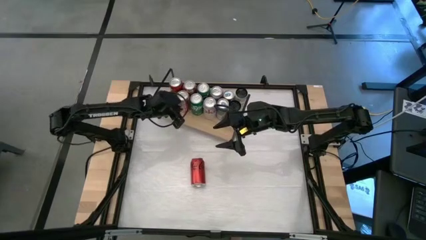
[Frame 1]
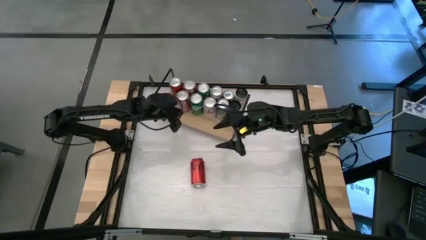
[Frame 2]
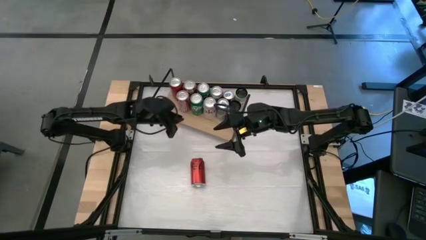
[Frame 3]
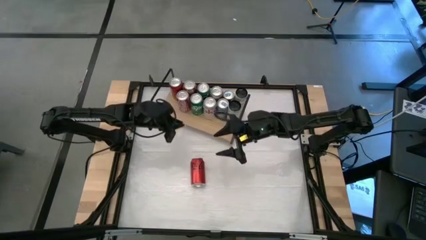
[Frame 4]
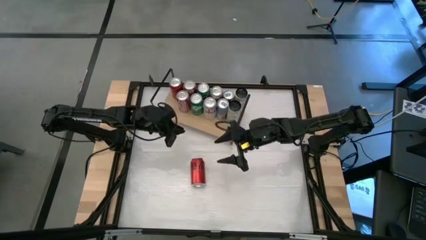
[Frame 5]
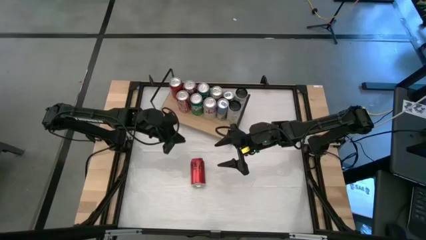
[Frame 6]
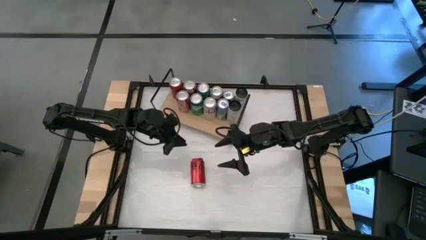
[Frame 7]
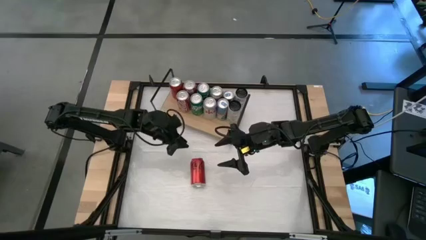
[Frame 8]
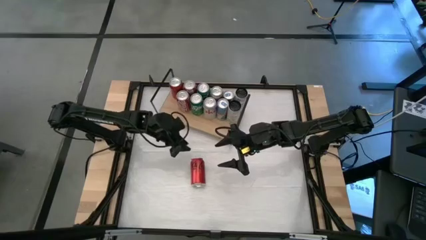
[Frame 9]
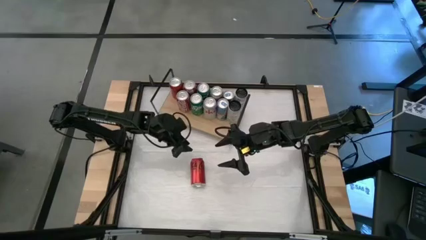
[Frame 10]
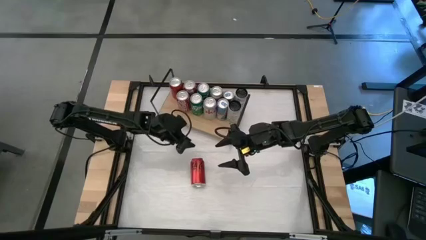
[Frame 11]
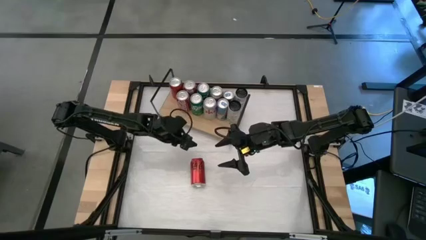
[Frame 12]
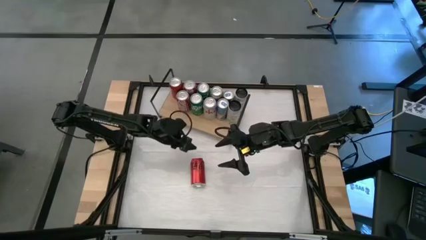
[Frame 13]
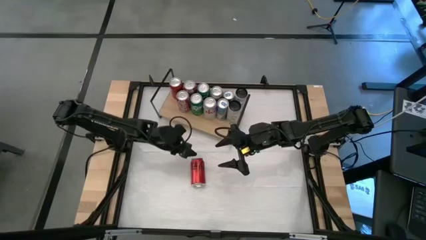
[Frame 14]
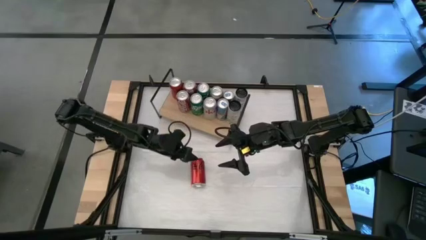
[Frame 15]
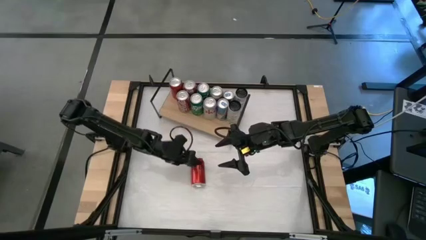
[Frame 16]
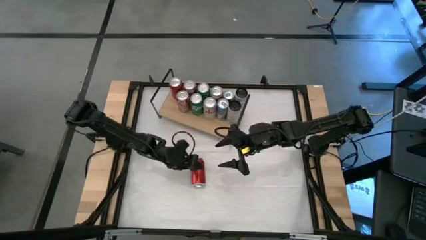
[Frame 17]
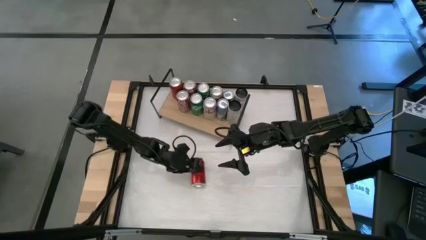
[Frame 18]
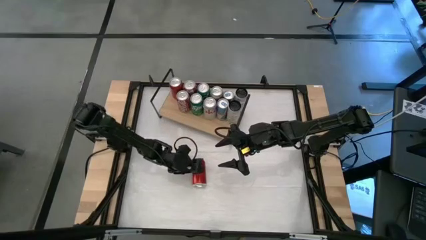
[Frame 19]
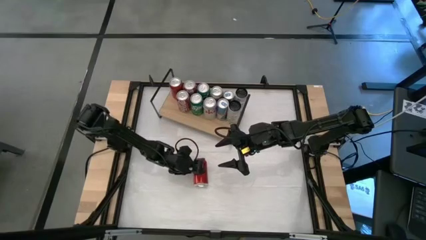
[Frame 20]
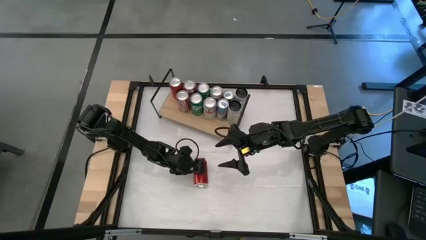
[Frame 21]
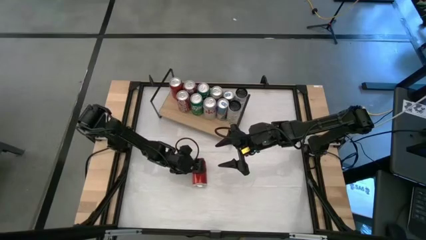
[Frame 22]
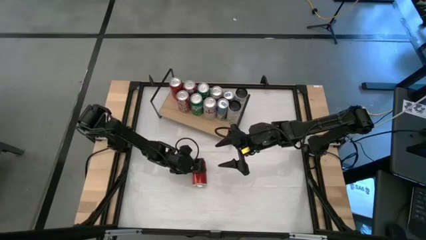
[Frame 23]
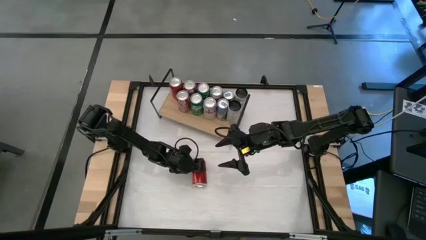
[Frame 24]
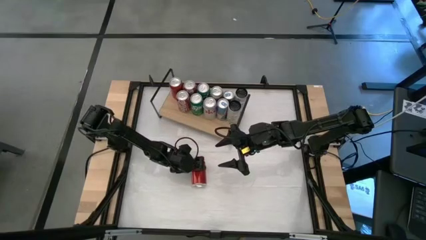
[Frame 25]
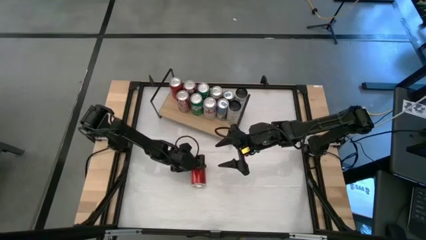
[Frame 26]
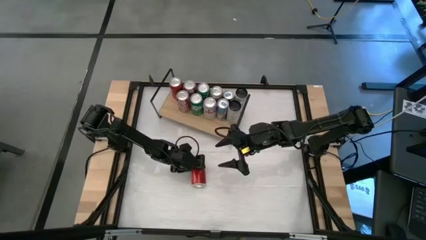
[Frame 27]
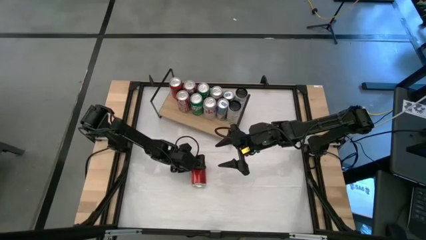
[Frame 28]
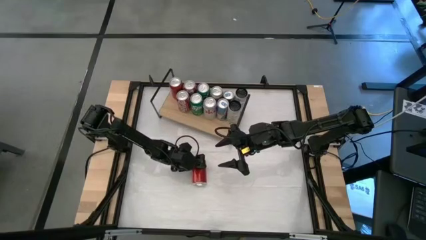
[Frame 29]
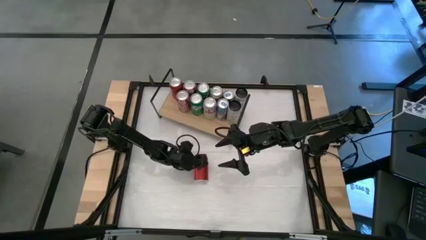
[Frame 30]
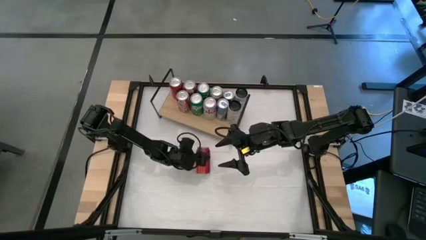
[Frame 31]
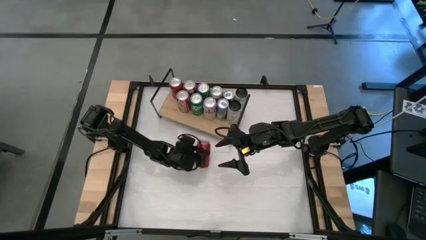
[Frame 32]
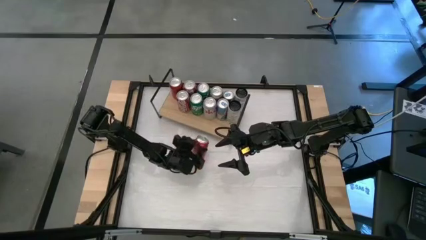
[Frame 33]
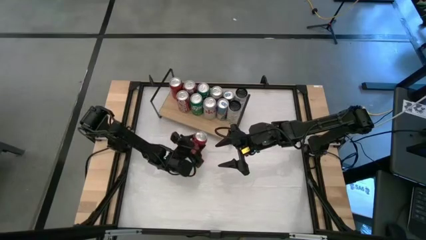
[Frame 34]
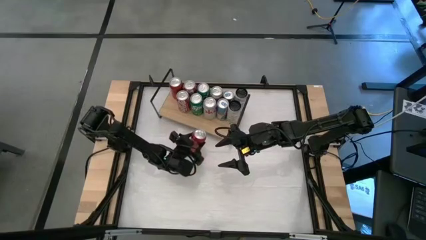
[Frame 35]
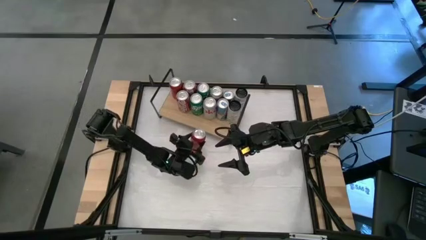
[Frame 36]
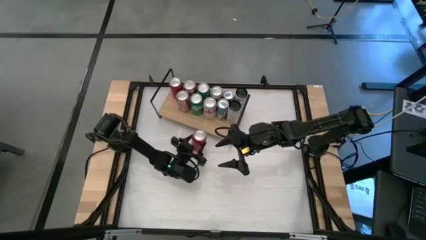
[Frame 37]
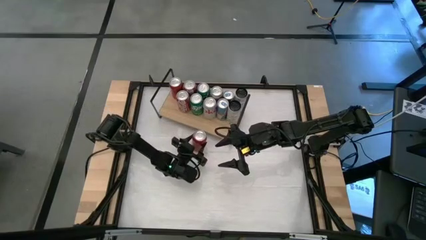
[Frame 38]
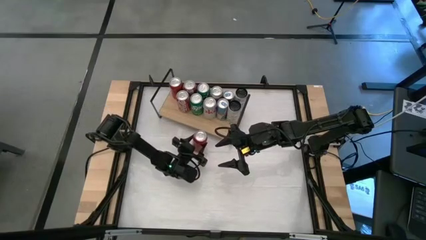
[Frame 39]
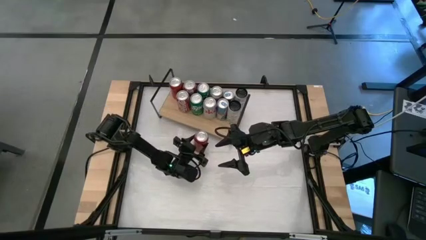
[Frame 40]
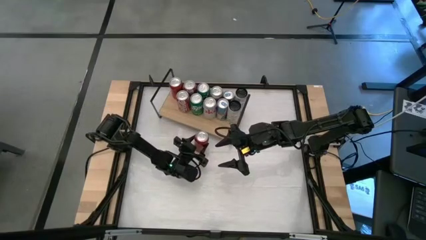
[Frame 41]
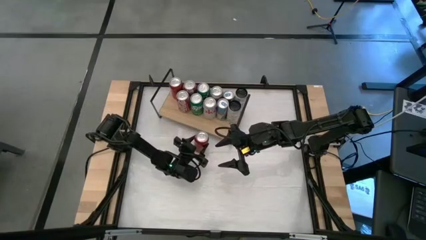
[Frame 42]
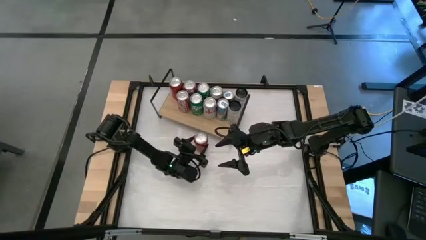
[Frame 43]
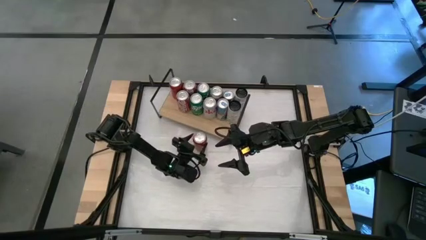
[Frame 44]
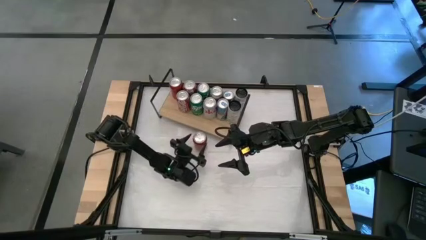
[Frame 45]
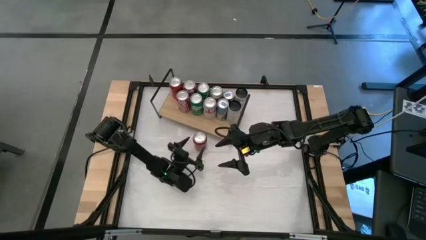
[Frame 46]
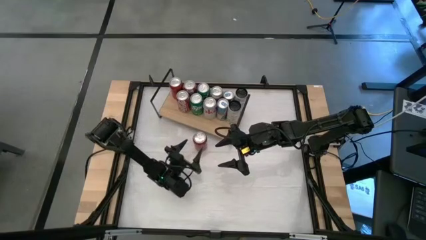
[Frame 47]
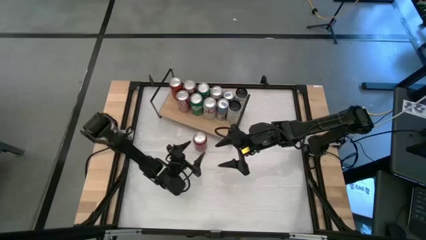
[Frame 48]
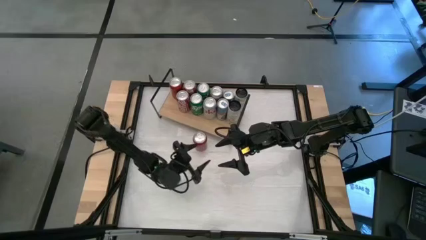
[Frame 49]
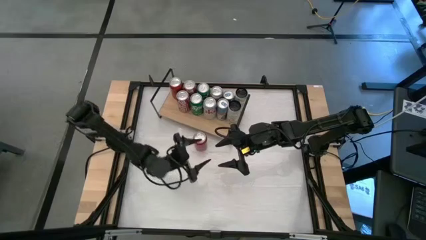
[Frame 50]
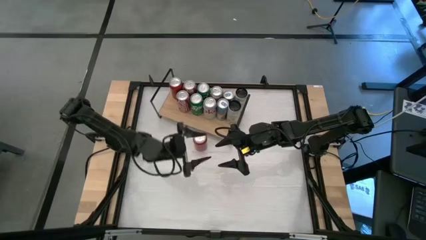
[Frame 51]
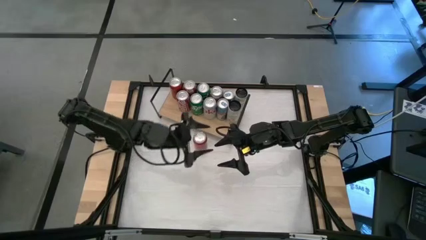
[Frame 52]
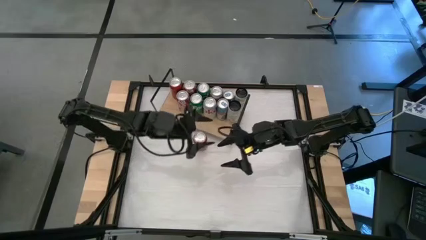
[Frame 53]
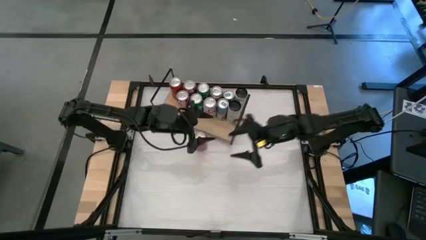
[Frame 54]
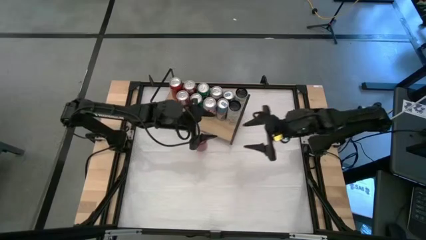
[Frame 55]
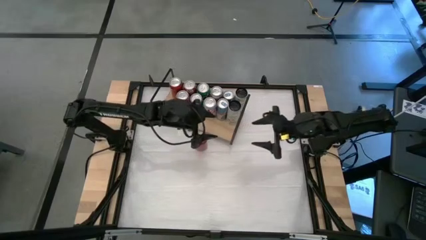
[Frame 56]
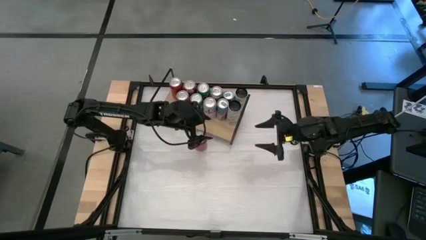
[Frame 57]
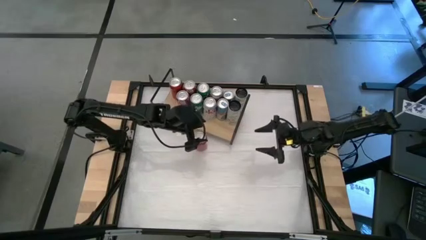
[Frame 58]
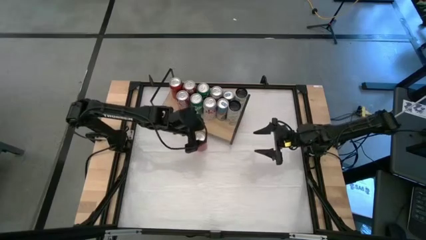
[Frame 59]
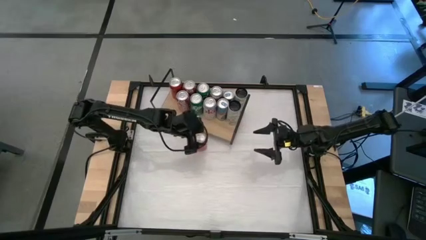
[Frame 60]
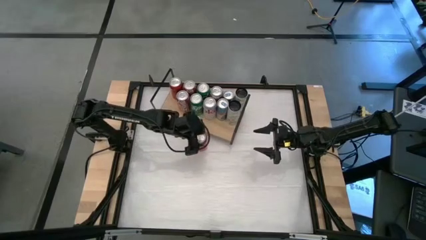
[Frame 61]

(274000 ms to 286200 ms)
Task: Place canned beverage on shelf
Put the red black soda can on the shelf aligned with the other red black soda can

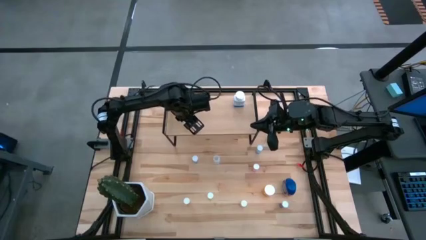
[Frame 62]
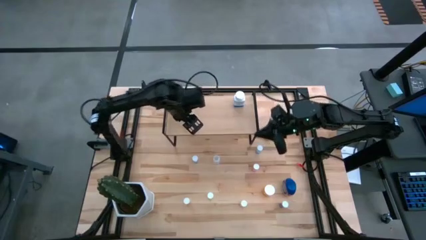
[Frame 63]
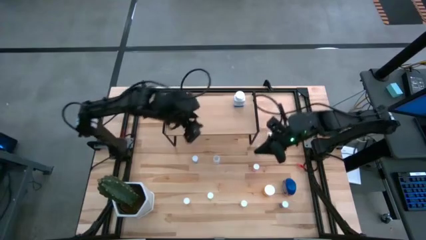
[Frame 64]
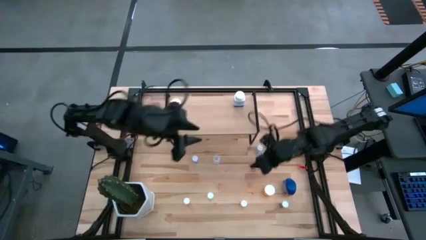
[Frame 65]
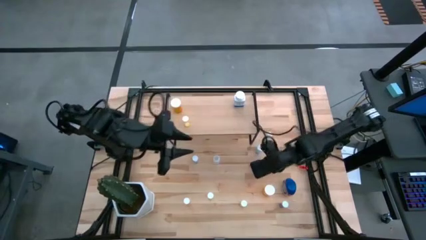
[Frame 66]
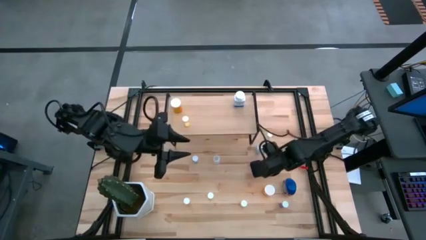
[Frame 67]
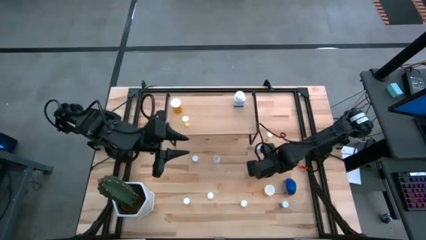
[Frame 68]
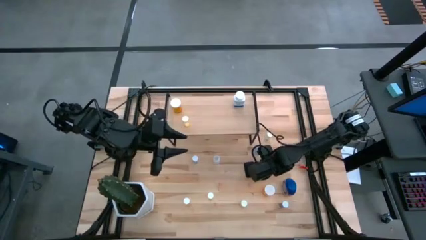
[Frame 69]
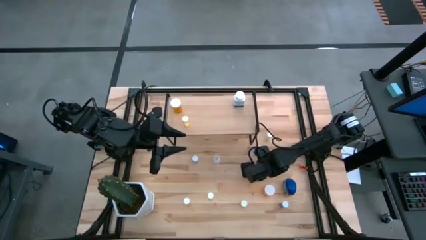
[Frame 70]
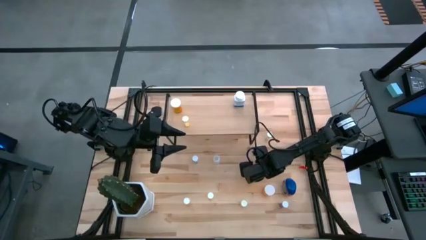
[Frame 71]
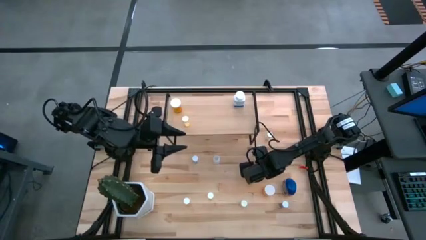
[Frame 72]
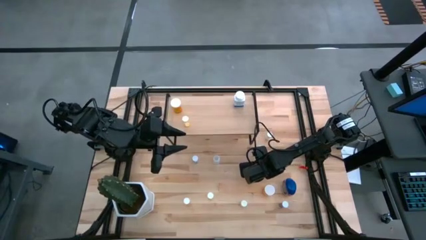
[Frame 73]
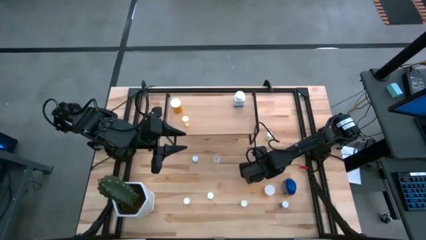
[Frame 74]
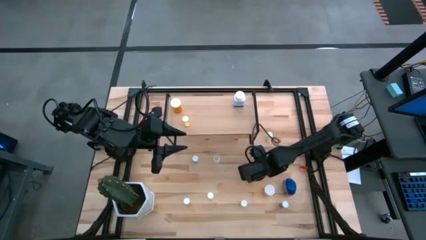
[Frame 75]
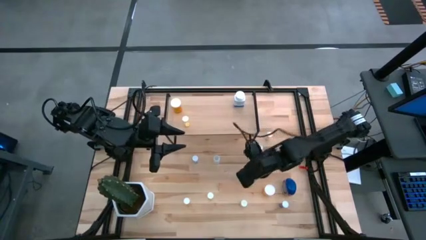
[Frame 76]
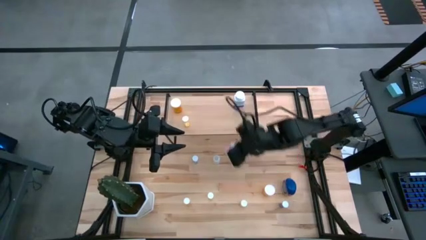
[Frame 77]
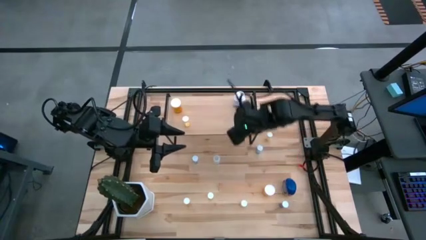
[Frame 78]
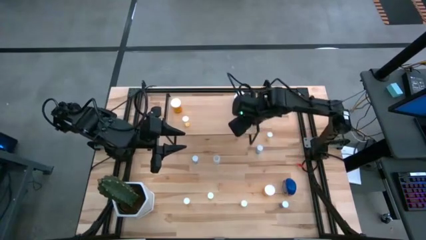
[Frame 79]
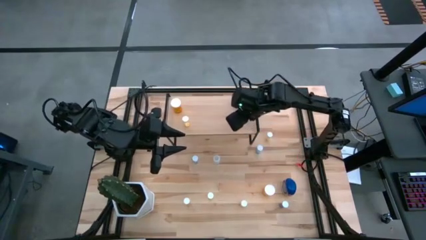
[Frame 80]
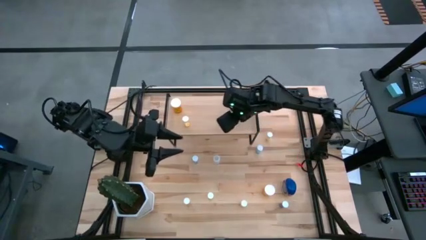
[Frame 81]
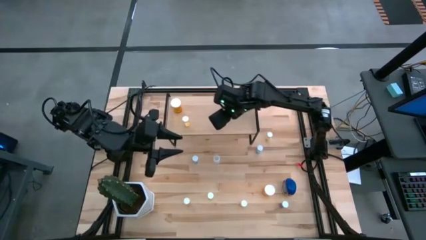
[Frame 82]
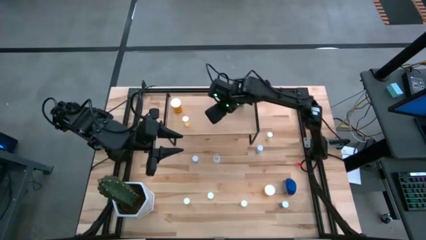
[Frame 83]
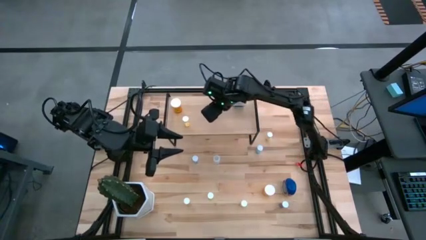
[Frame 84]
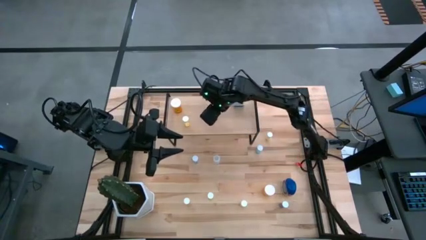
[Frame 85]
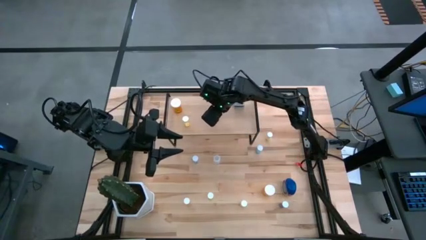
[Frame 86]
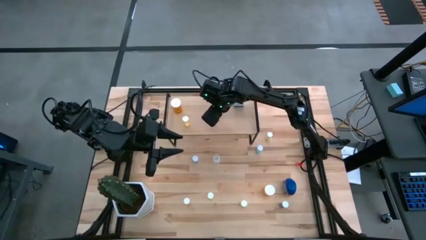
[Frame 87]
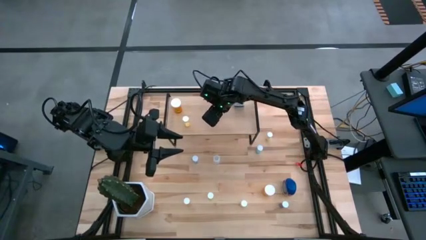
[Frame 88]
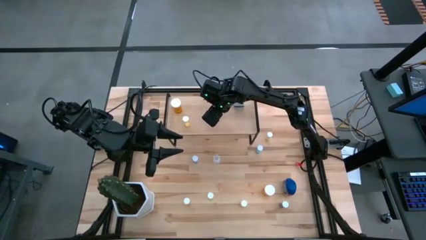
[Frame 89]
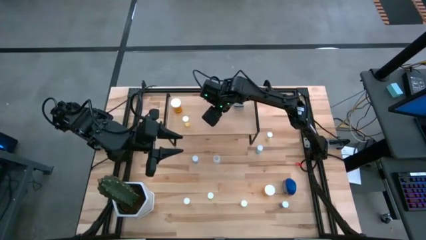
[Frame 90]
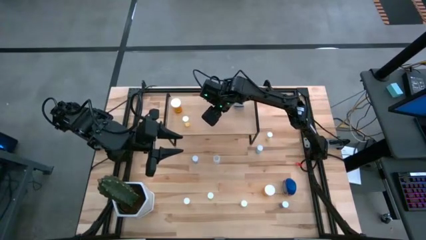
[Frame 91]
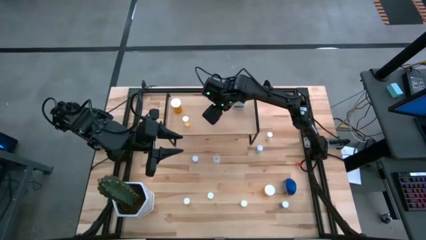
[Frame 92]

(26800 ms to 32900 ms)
Task: Pick and place medicine bottles onto shelf by color
Put the pink pill bottle on the shelf
